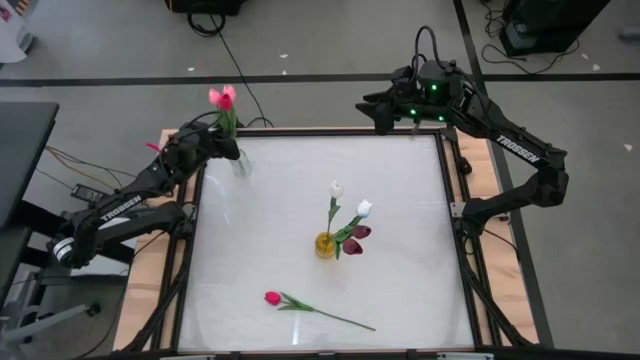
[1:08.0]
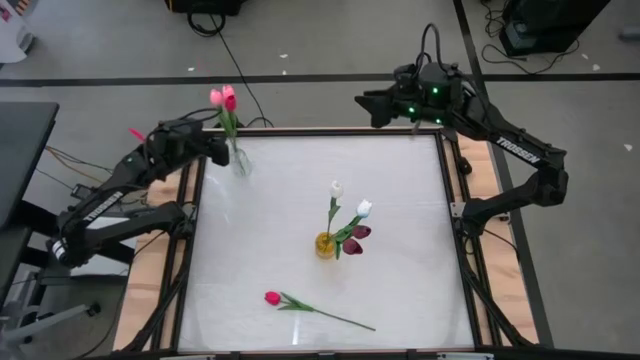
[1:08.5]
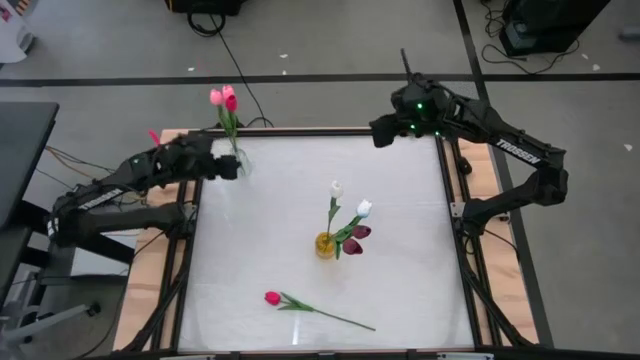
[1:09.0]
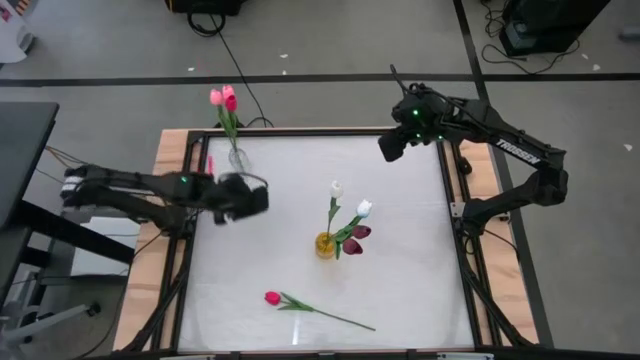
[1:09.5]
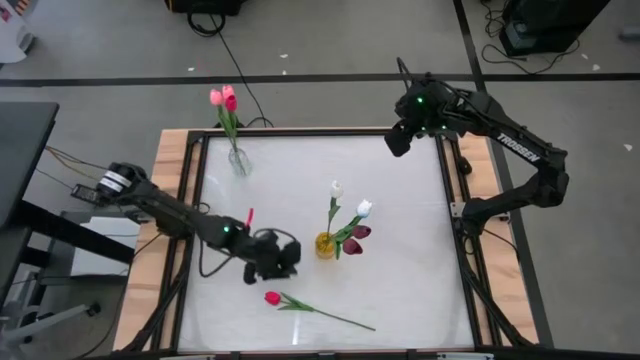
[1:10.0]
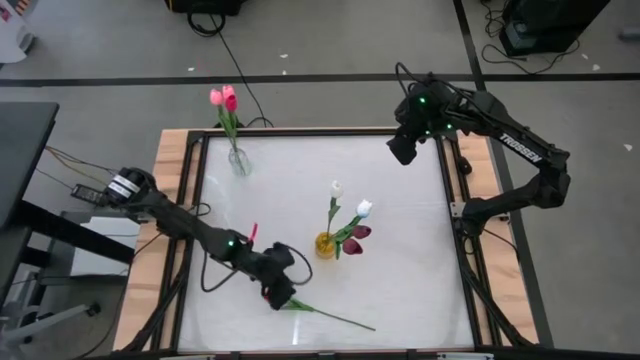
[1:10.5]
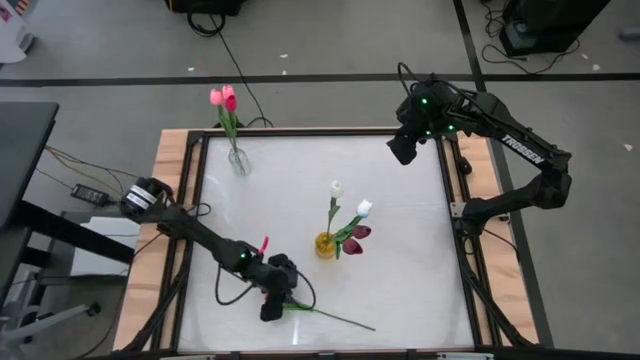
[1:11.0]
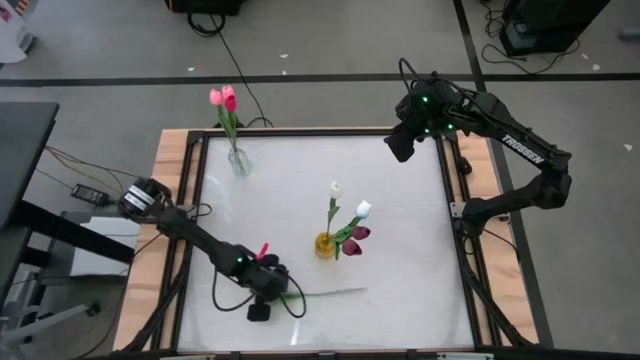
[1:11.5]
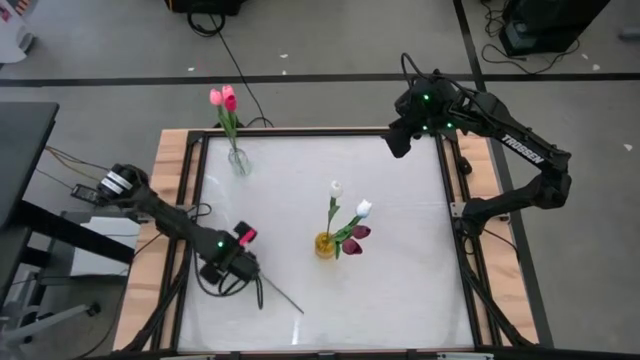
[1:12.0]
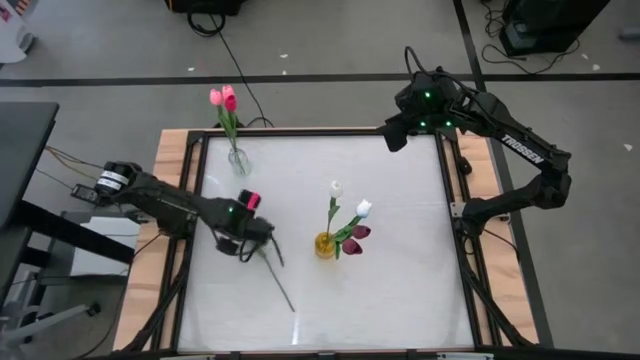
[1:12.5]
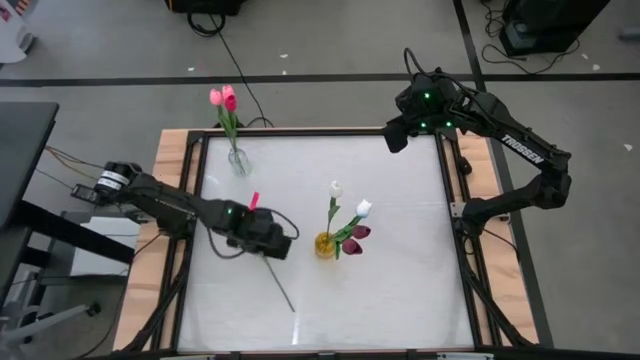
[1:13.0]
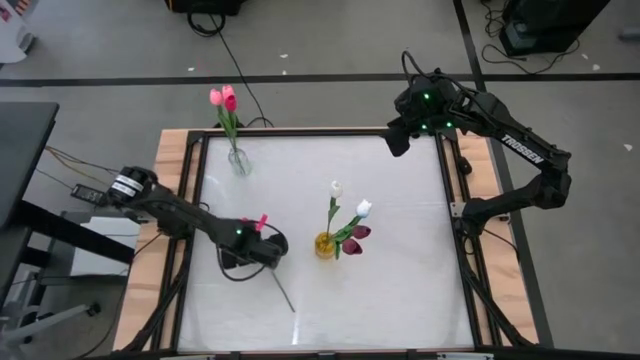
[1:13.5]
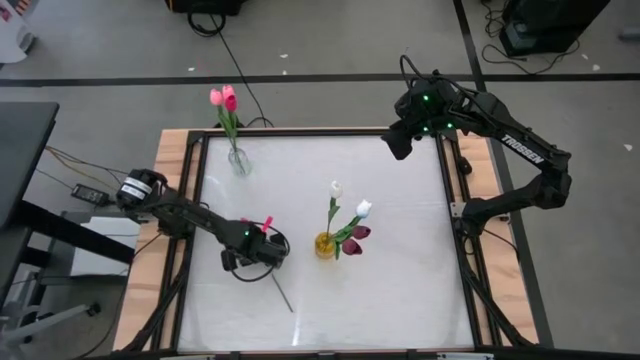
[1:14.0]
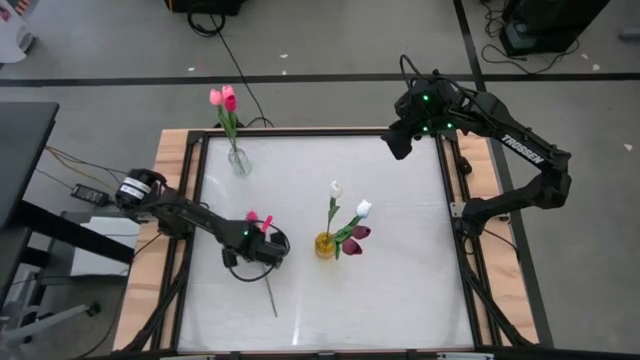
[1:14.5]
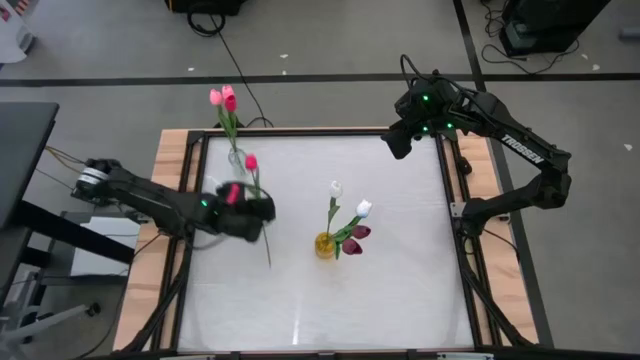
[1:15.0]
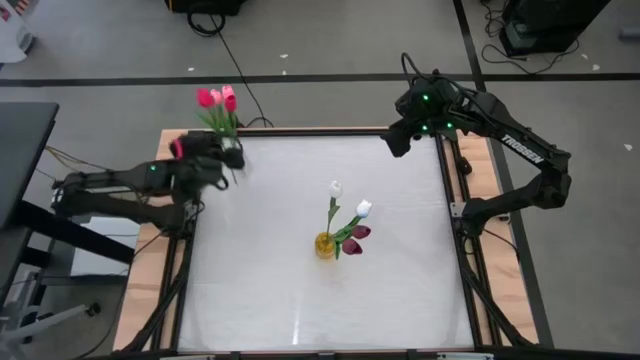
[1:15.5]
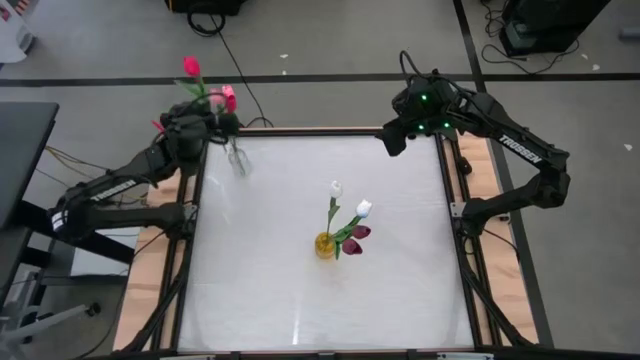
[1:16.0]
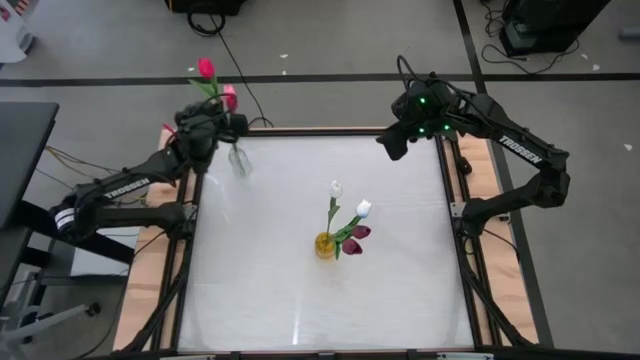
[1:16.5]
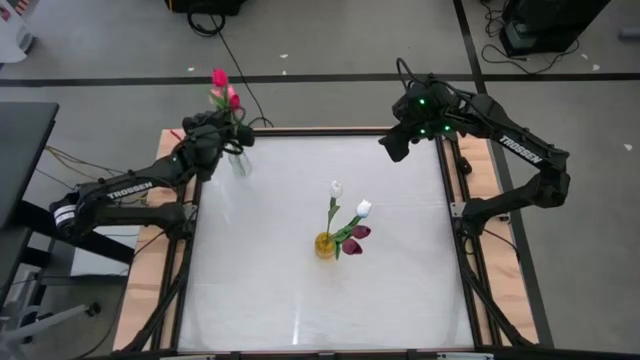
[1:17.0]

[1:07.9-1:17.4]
Task: Sort flowers into vase by color
Put the red tulip into the transparent flower vase

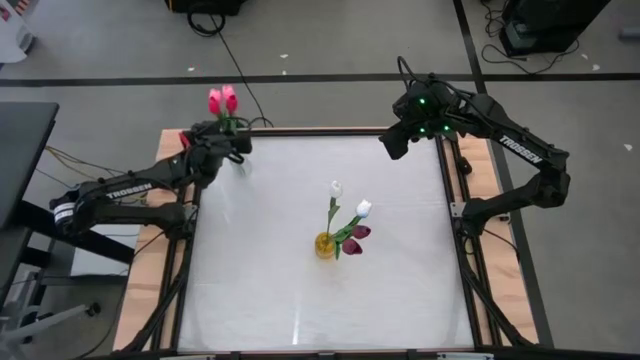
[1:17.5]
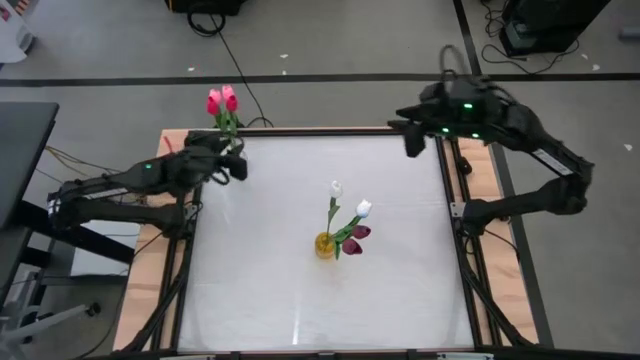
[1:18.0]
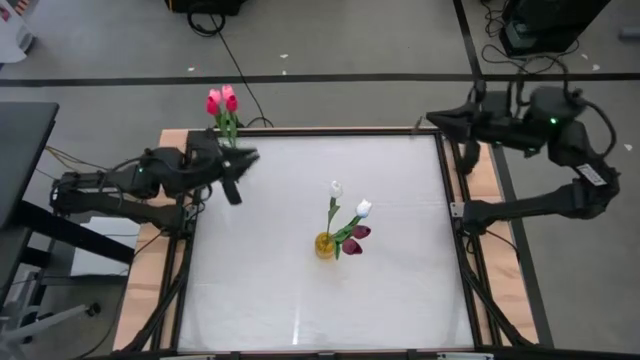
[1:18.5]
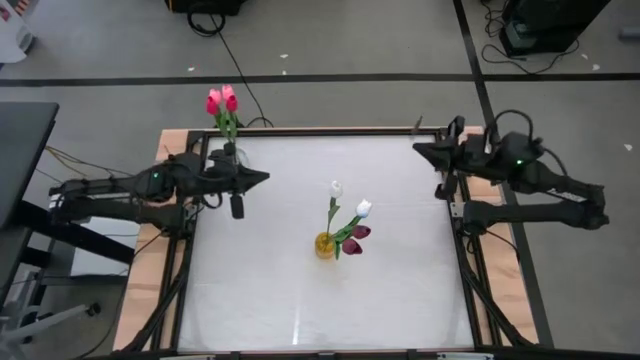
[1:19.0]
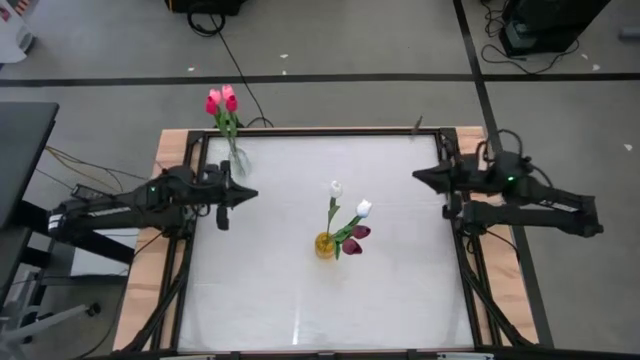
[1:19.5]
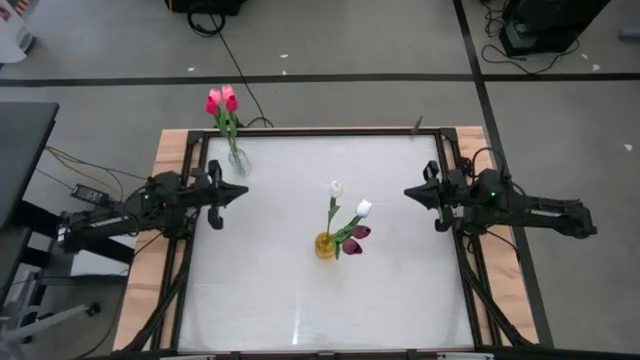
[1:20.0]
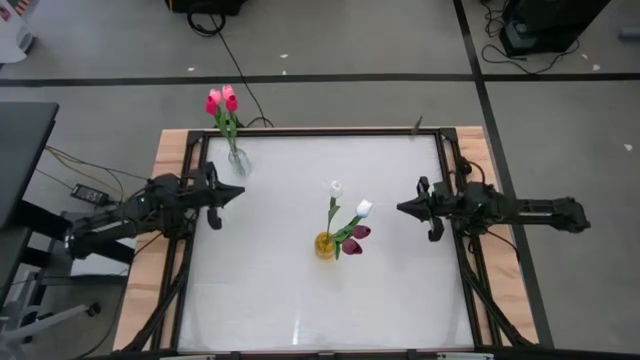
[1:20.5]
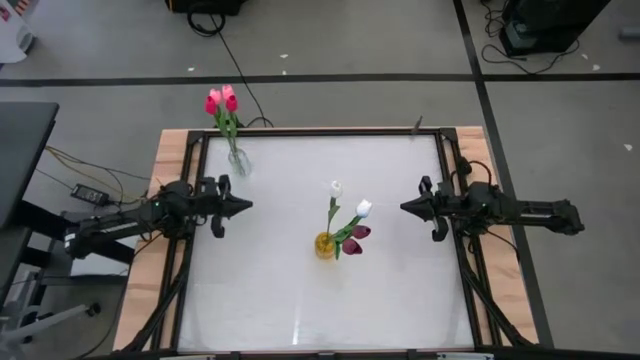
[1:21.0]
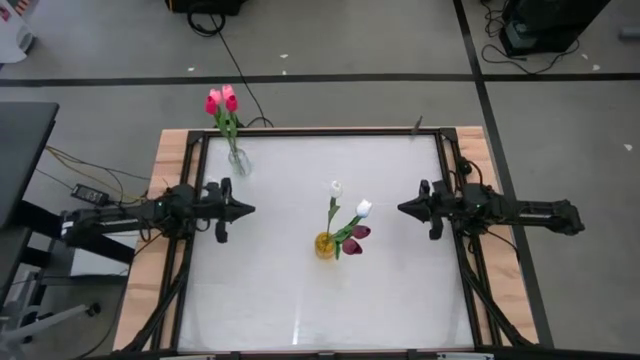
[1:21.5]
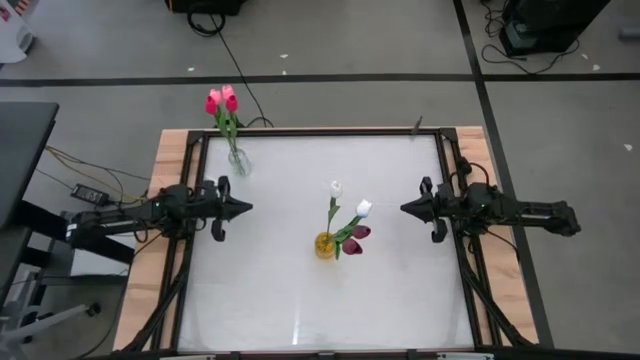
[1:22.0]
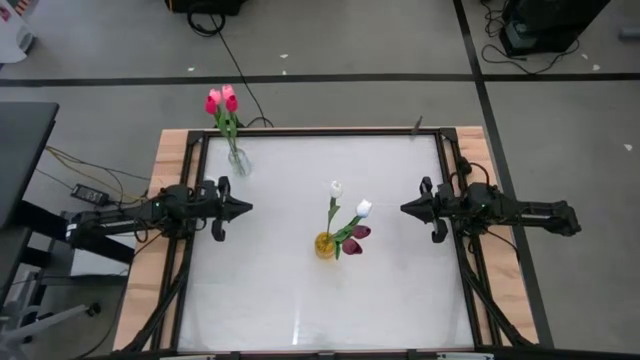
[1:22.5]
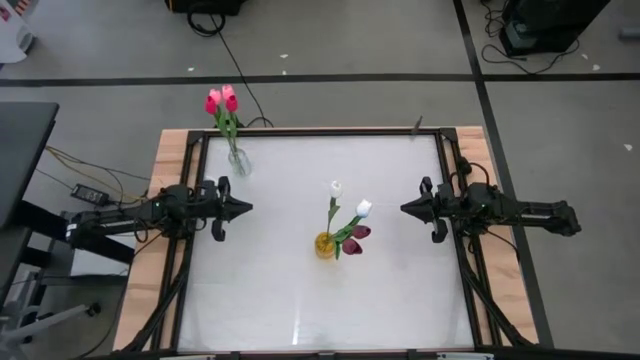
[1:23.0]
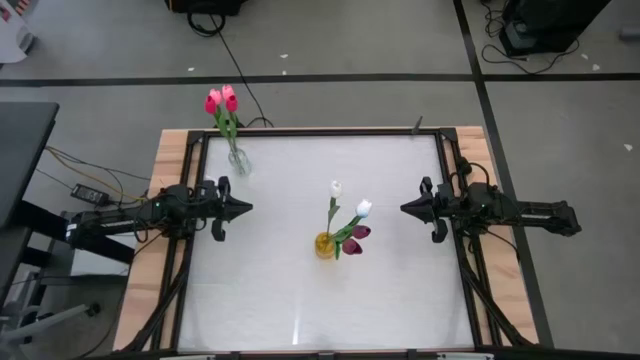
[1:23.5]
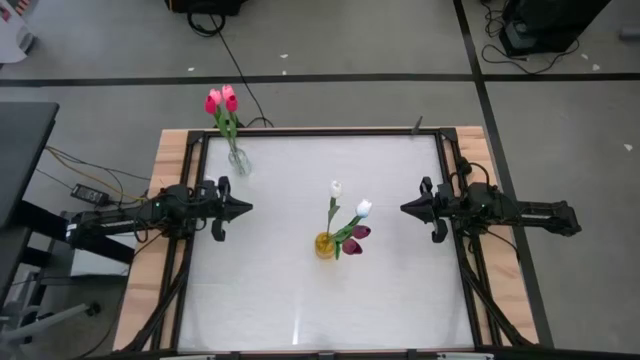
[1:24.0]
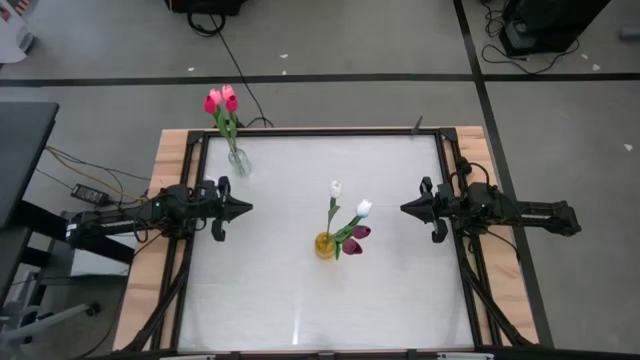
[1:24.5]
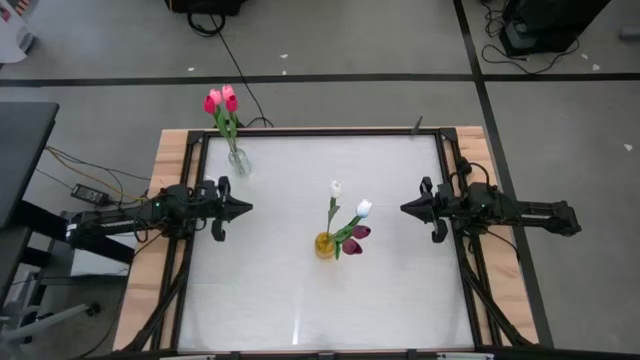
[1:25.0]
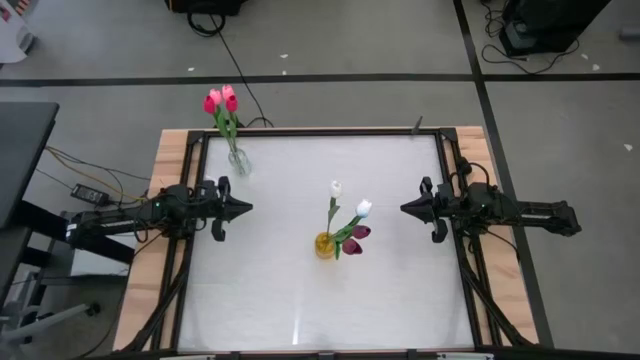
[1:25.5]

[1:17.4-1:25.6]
Return to Home Position

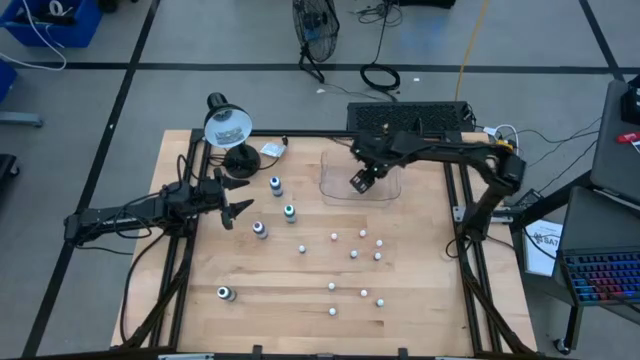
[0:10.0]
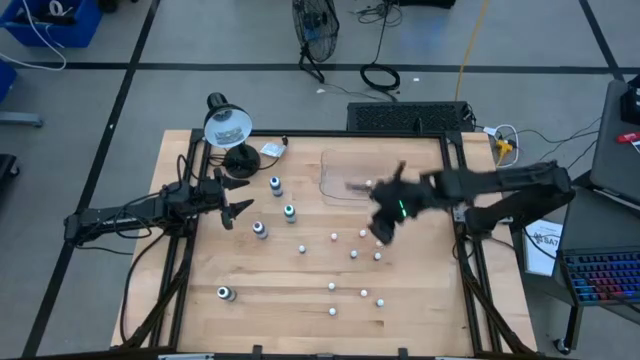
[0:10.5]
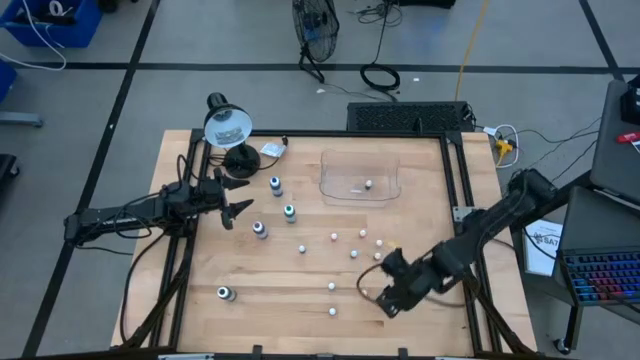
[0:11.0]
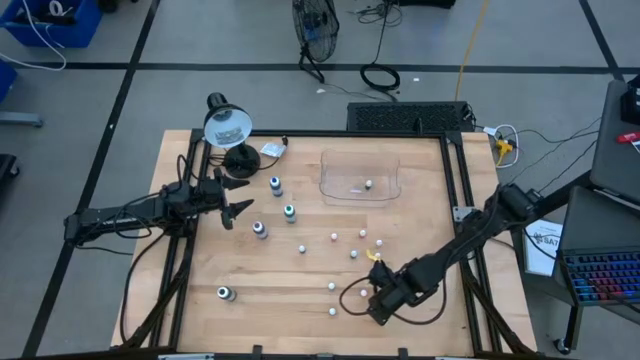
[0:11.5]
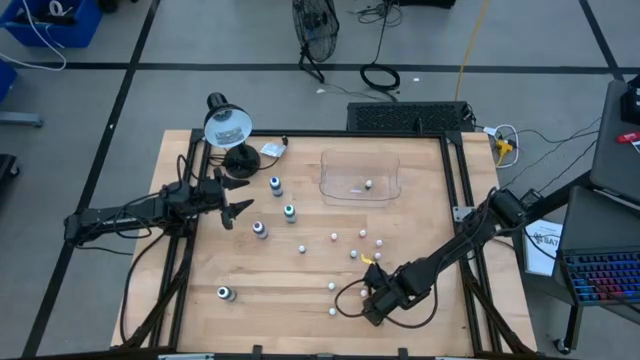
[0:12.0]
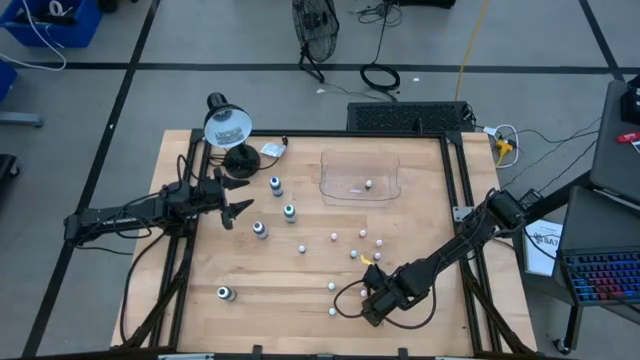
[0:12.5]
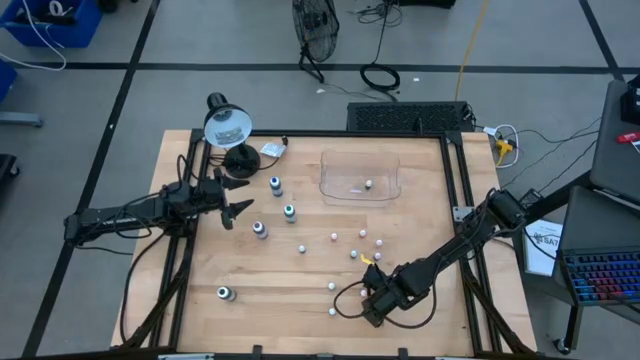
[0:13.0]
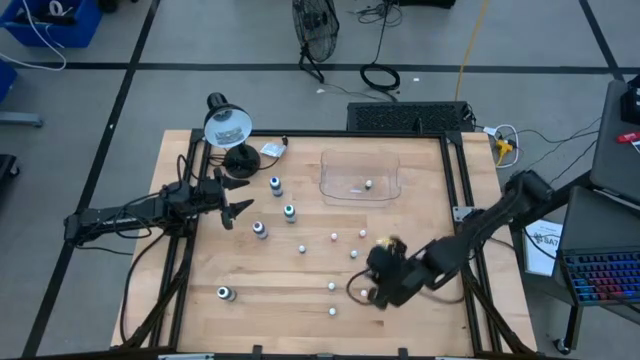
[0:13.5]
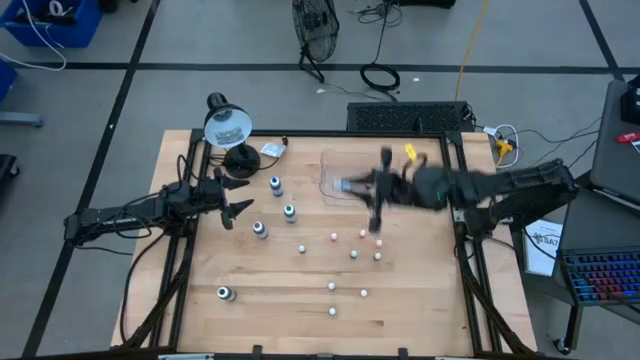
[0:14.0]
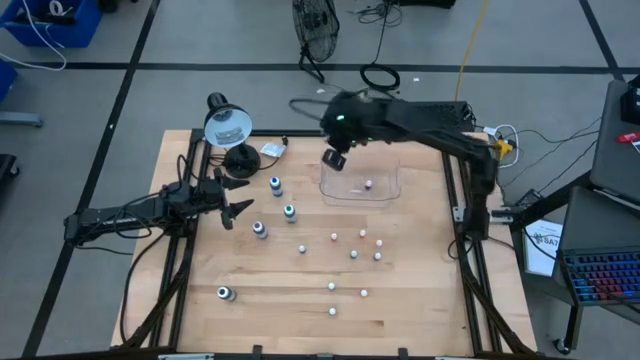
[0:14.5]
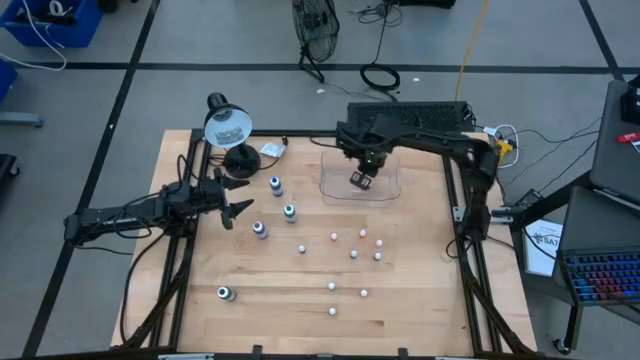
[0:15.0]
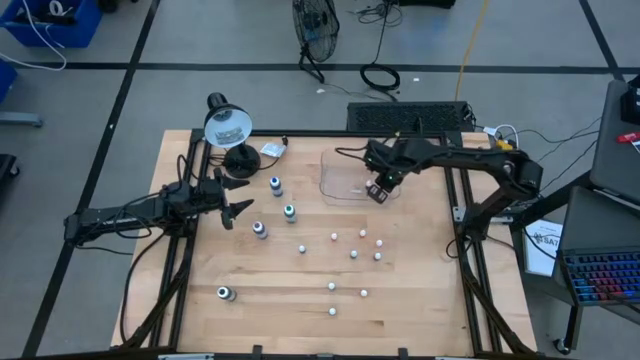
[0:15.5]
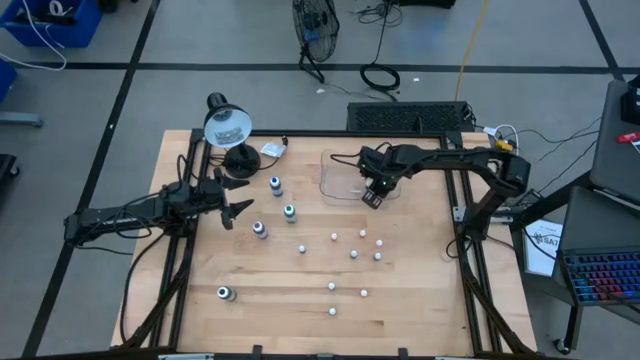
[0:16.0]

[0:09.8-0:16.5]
Task: Pick & Place food coloring
Put the black food coloring into the transparent bin
